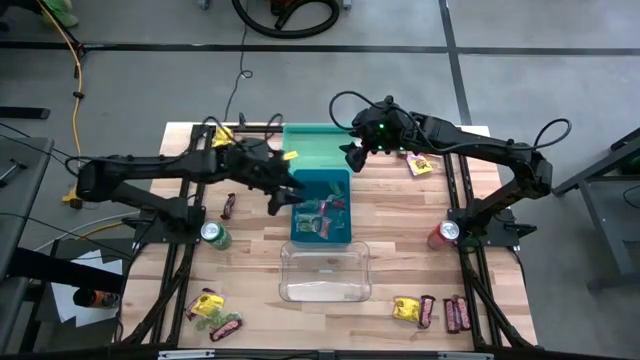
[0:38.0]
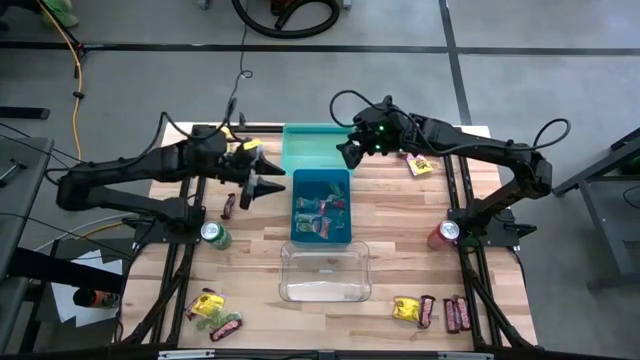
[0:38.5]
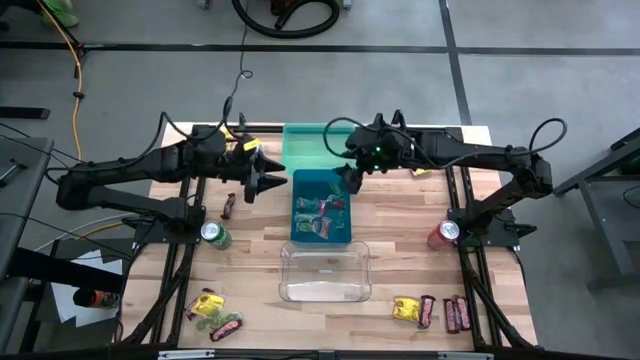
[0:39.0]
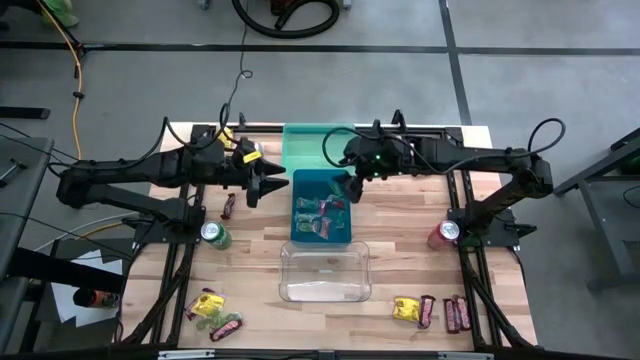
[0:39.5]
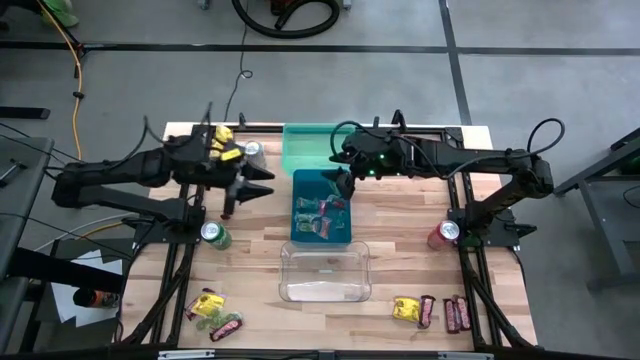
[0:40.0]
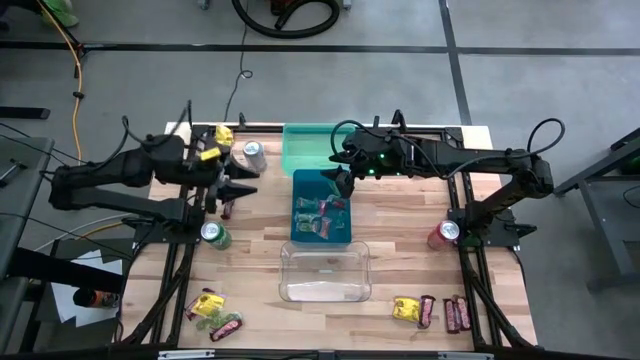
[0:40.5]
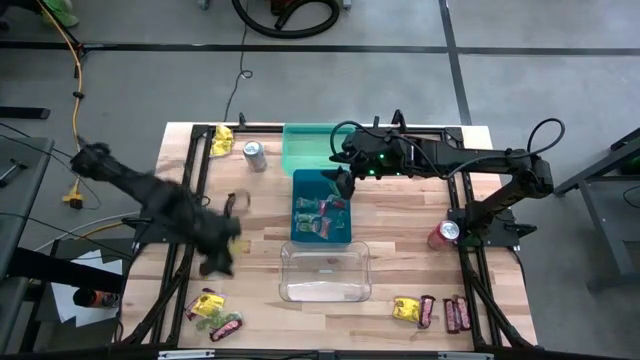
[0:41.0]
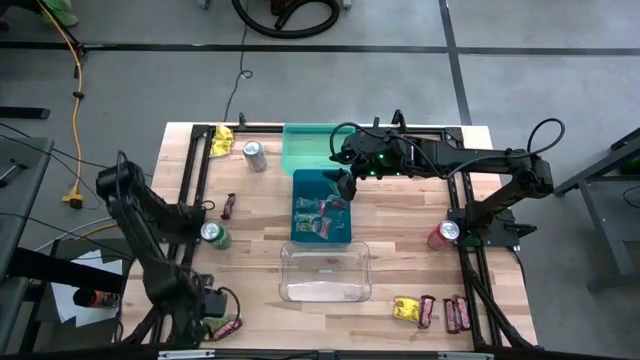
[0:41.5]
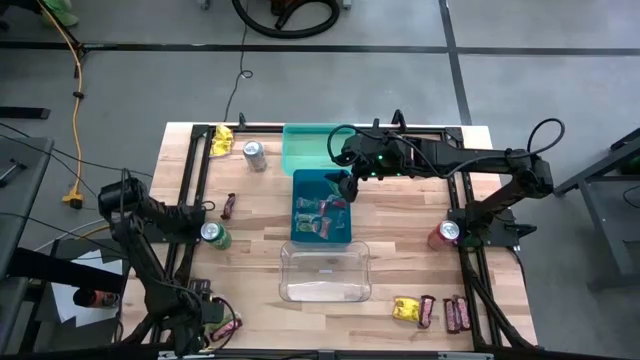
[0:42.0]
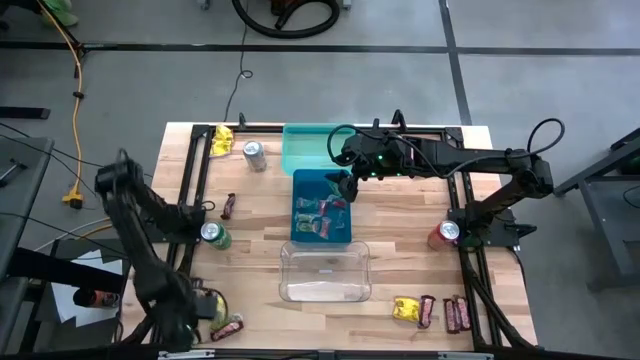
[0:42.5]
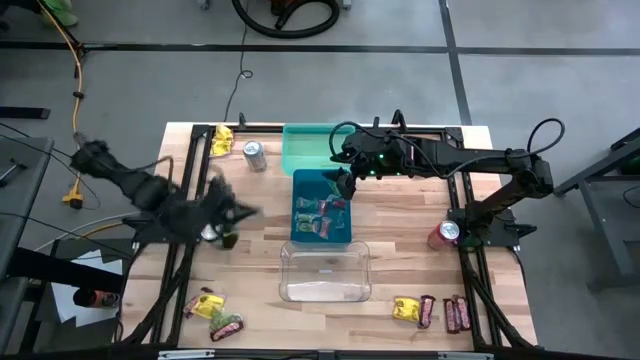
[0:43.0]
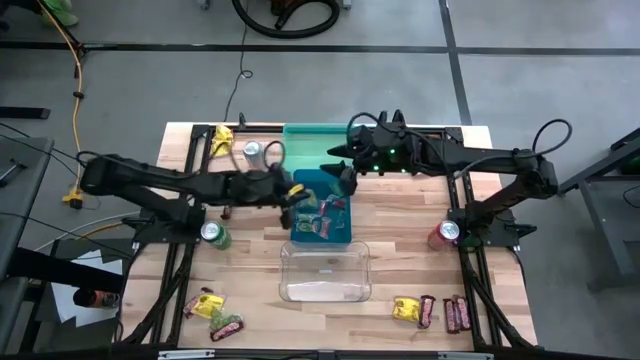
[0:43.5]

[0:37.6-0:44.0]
Task: Sort candy
Put the green candy into the blue bin

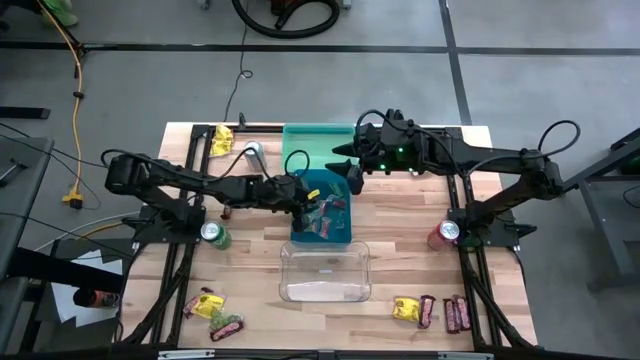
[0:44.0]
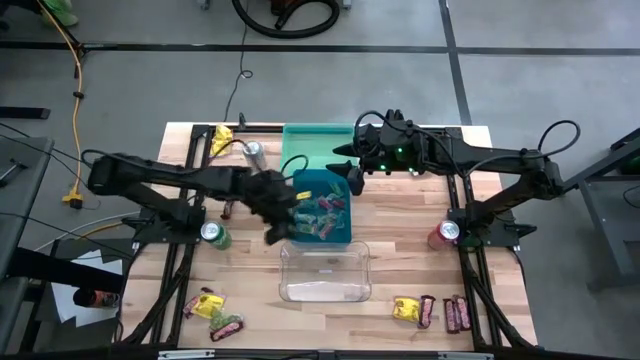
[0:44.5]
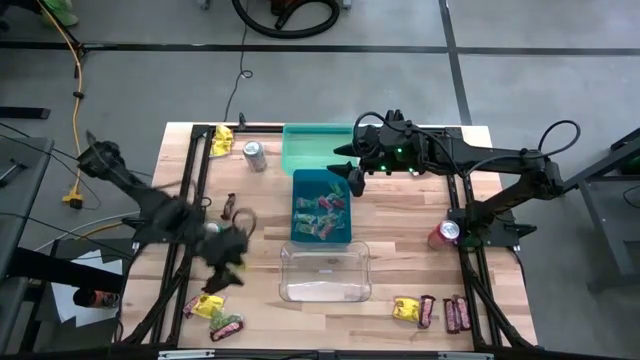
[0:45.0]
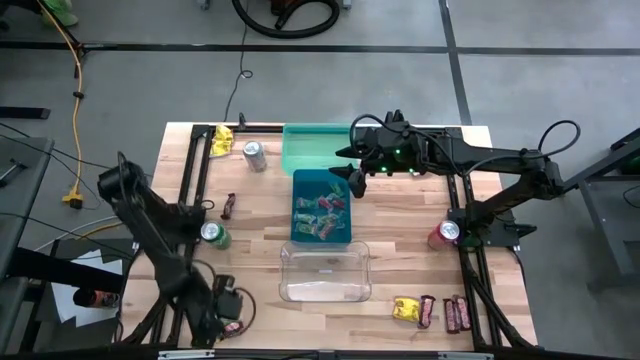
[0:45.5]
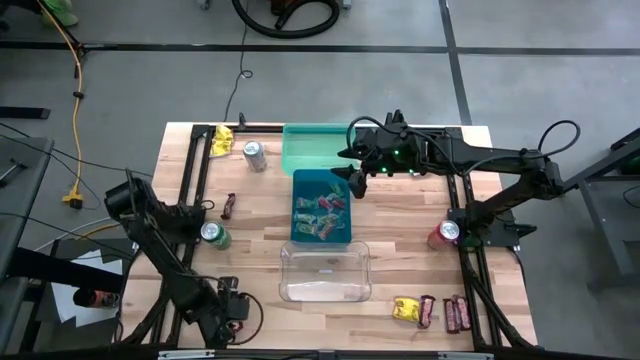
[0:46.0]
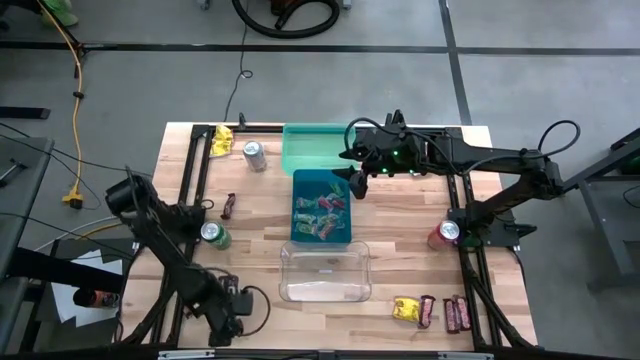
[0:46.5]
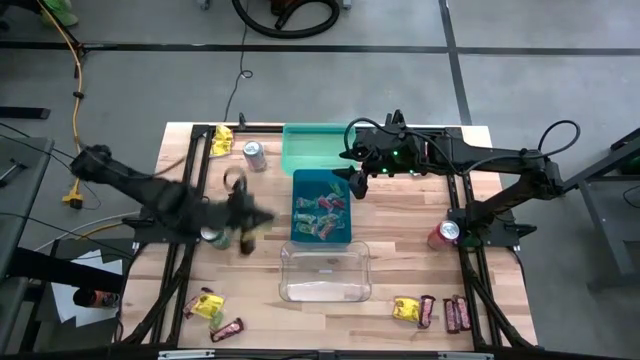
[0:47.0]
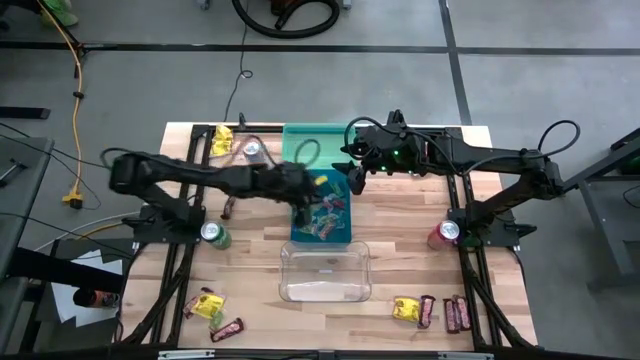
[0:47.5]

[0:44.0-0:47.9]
Put the green candy into the blue bin

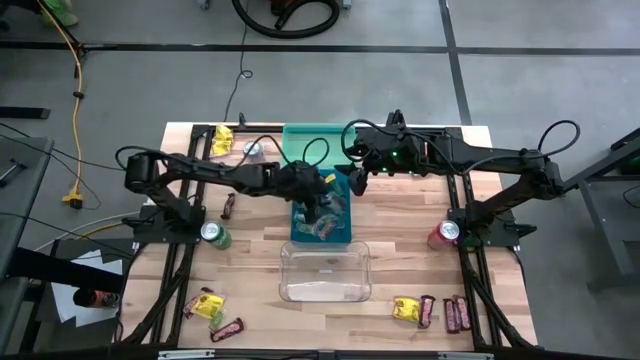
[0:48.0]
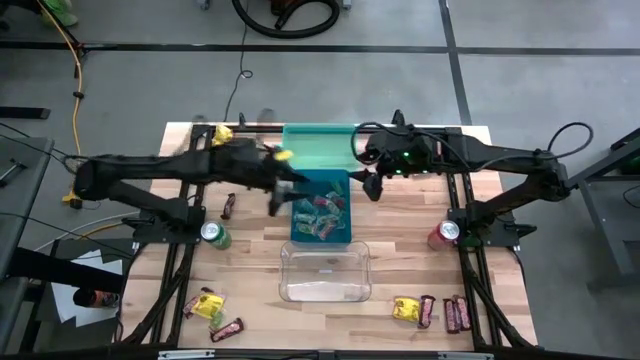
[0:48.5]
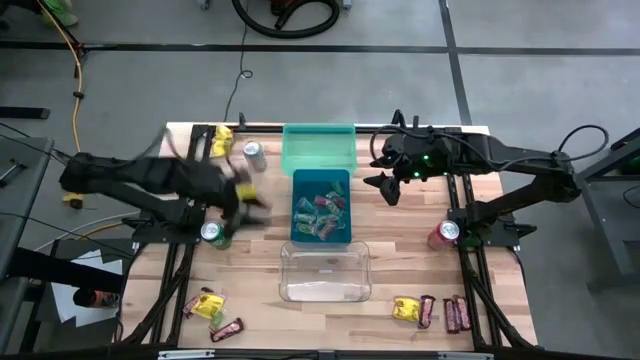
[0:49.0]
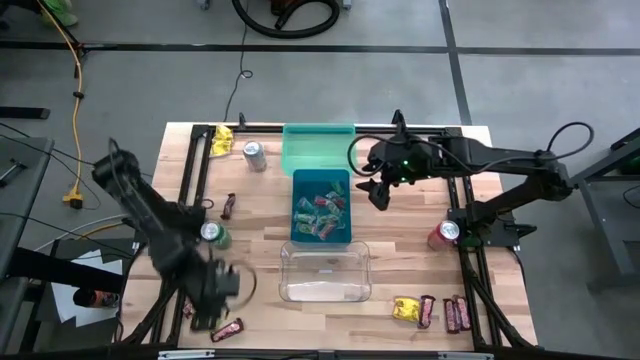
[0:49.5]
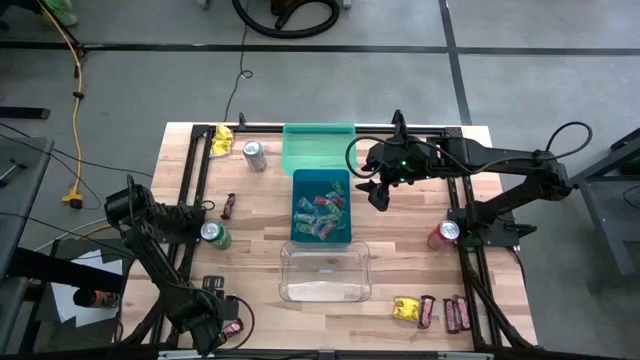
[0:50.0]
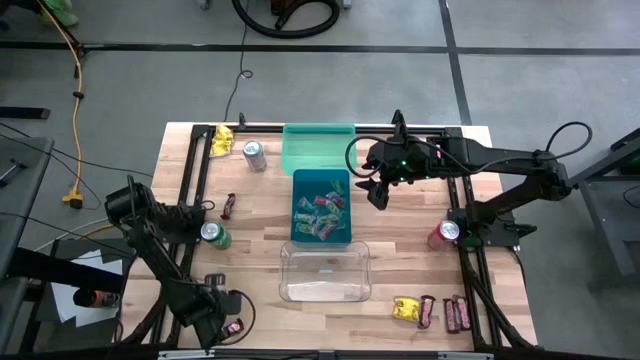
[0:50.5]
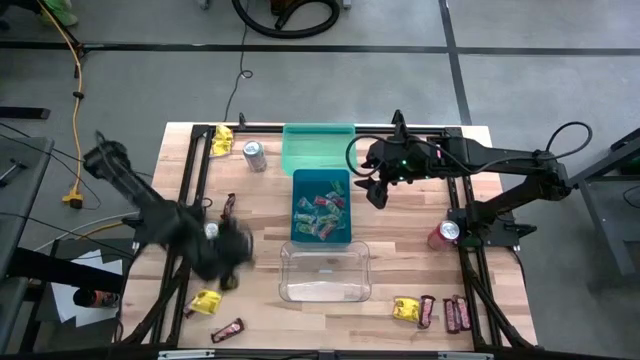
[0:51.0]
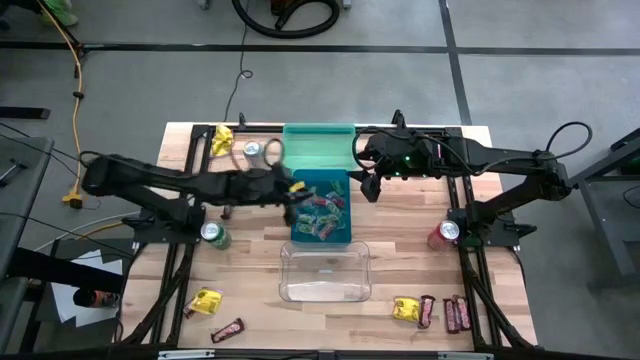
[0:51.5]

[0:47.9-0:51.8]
Put the green candy into the blue bin

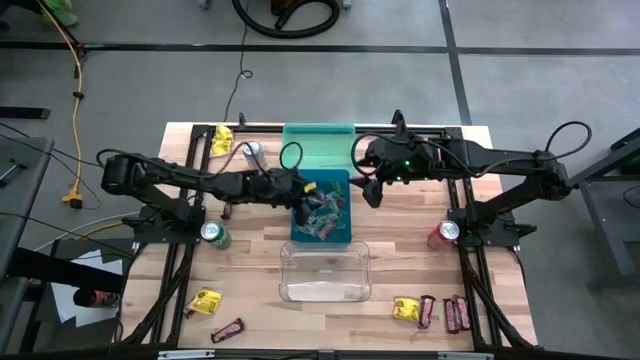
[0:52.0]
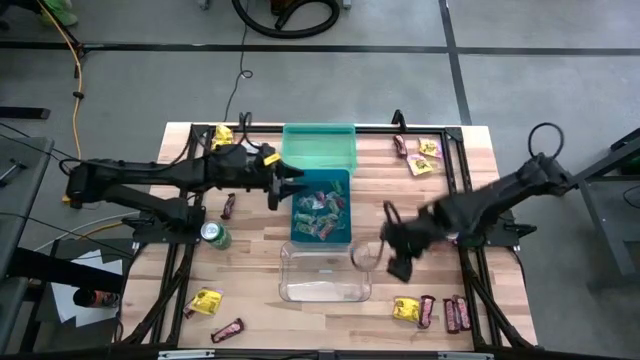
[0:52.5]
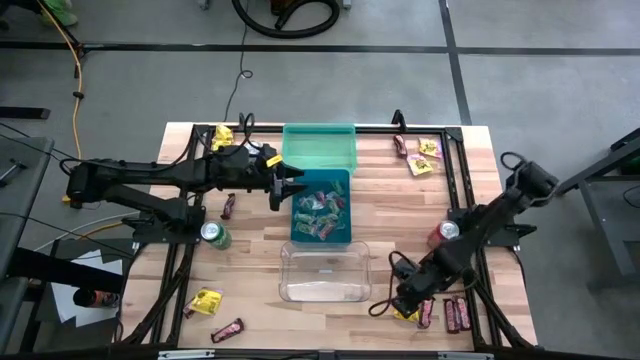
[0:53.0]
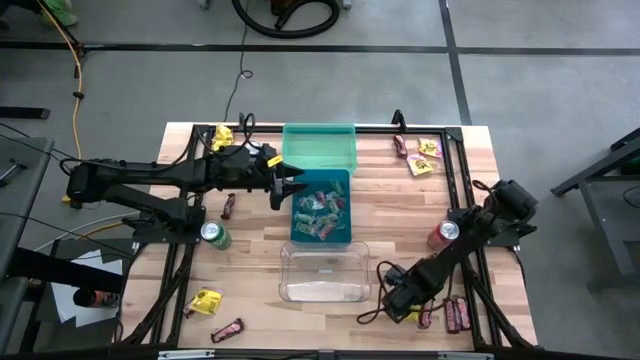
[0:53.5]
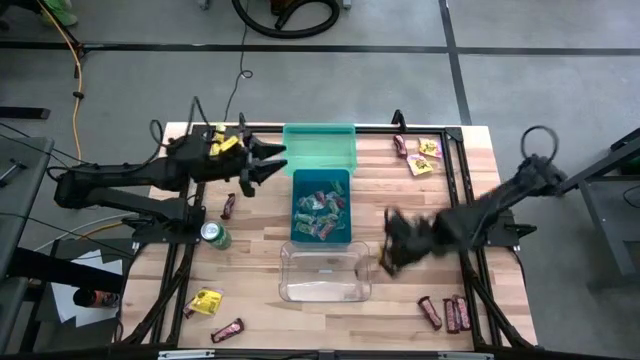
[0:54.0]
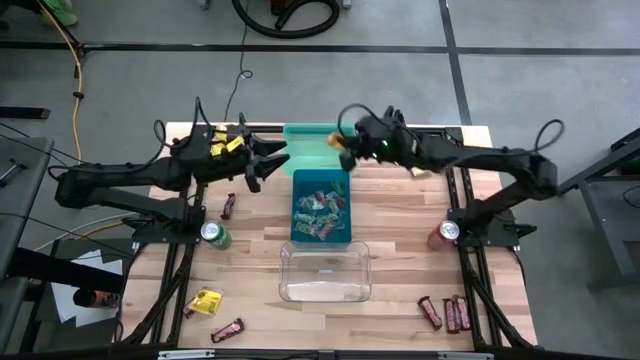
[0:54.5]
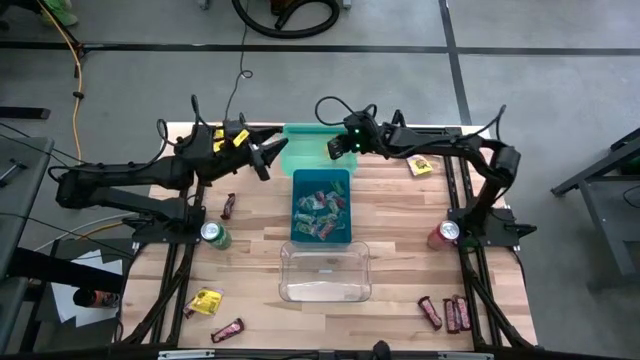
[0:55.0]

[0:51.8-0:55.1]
Put the yellow candy into the light blue bin

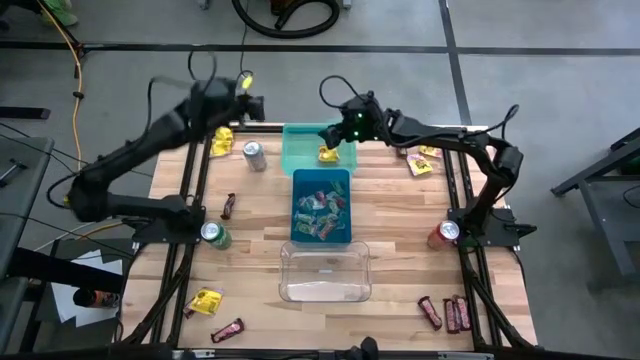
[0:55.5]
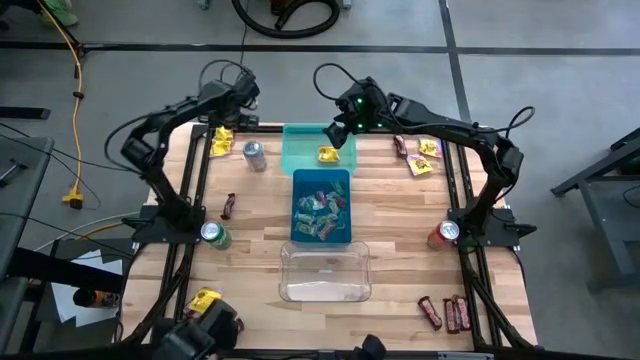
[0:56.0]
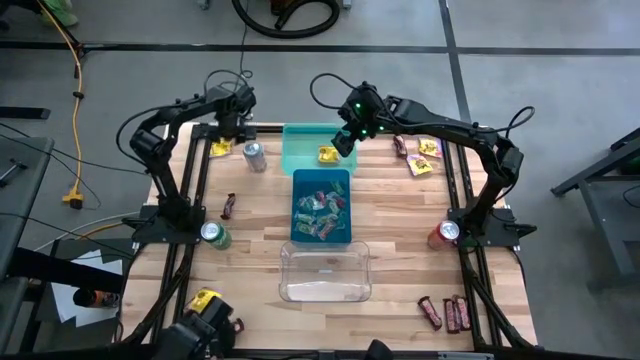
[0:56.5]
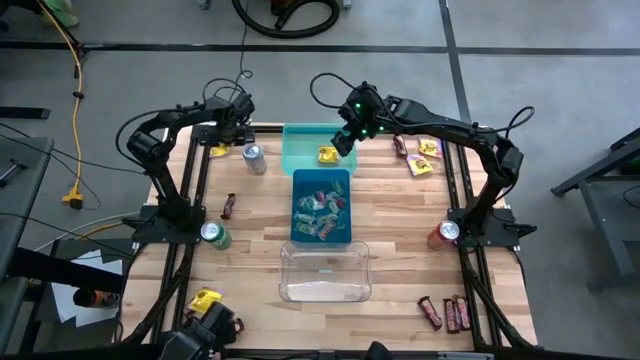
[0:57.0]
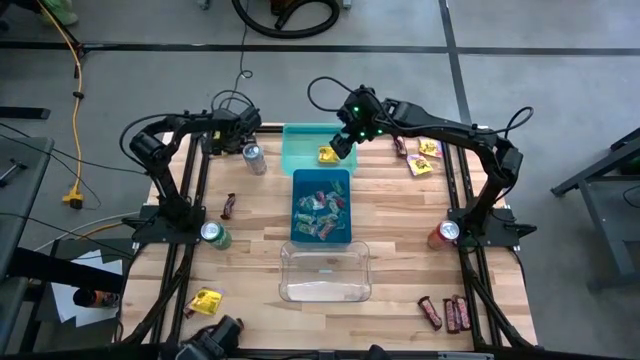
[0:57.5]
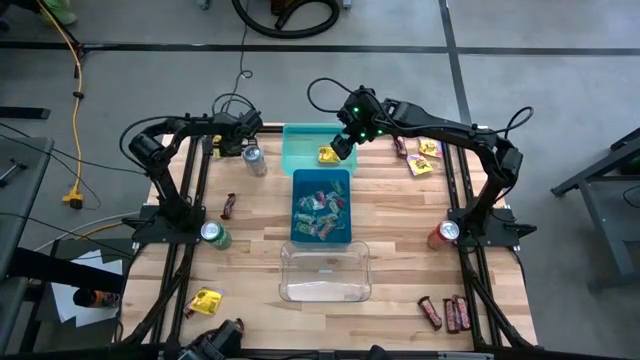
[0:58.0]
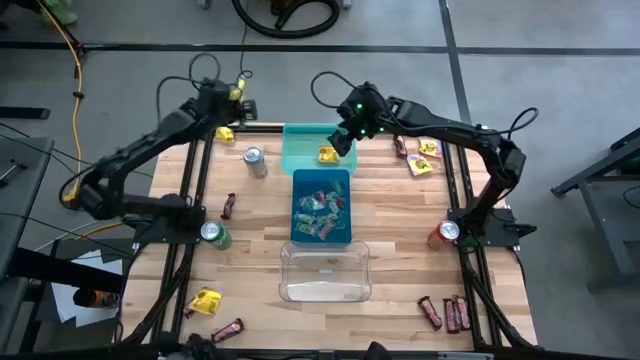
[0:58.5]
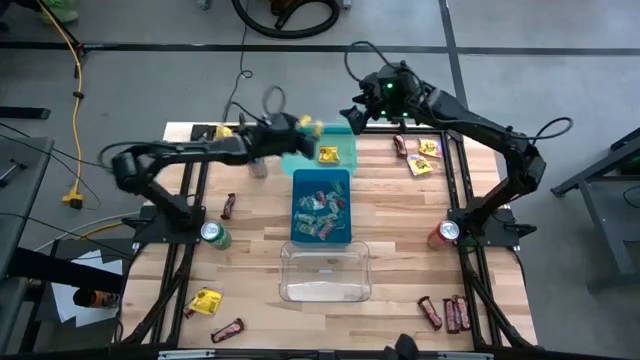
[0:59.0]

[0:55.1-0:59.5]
Put the yellow candy into the light blue bin
